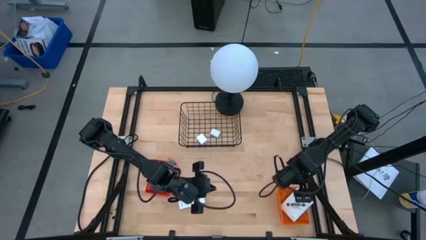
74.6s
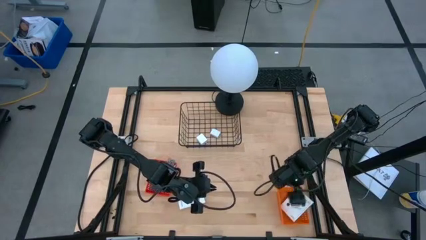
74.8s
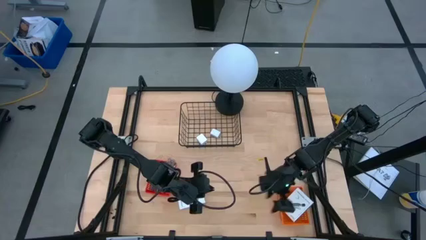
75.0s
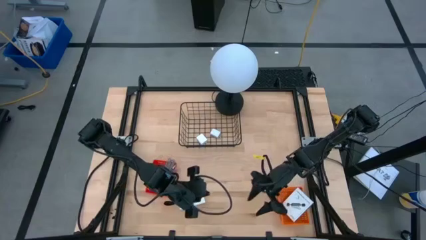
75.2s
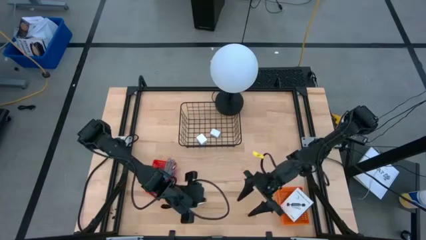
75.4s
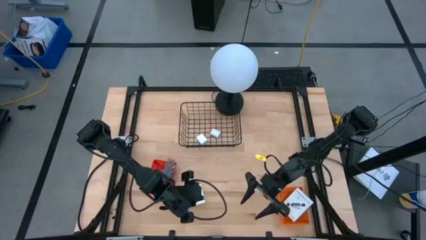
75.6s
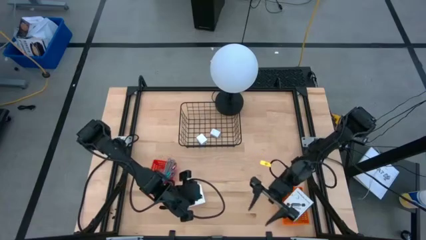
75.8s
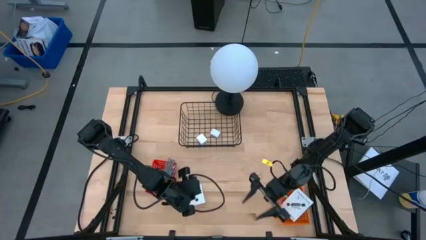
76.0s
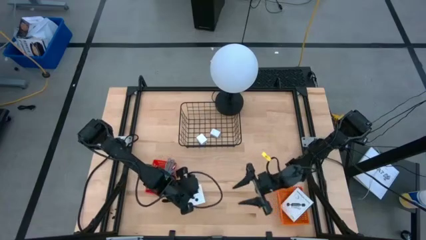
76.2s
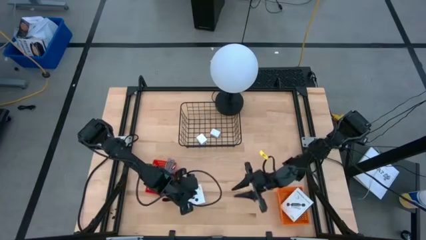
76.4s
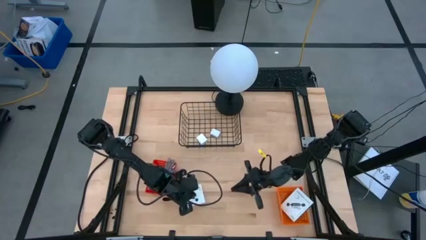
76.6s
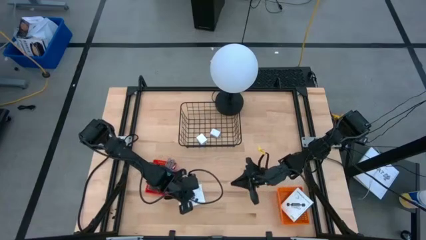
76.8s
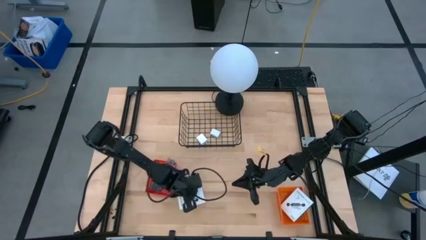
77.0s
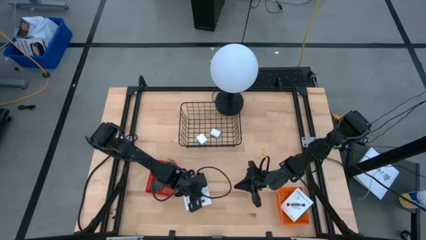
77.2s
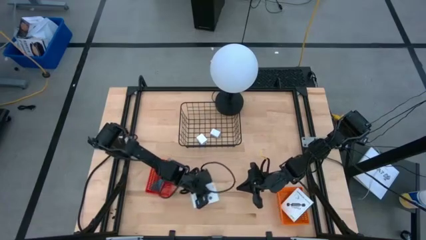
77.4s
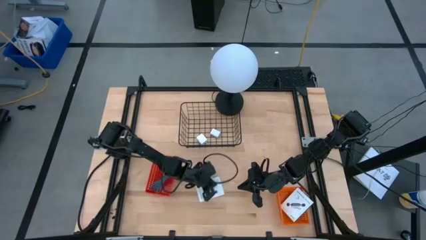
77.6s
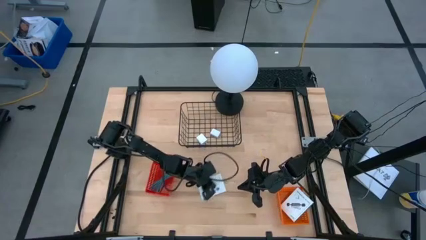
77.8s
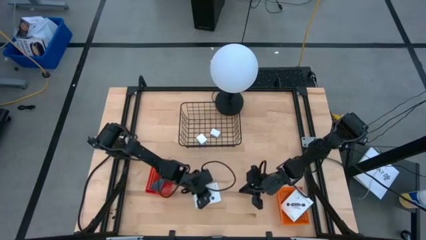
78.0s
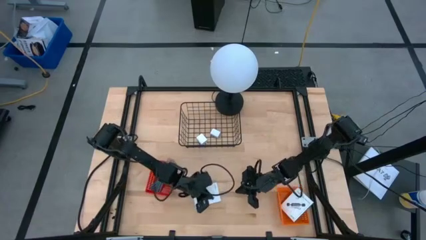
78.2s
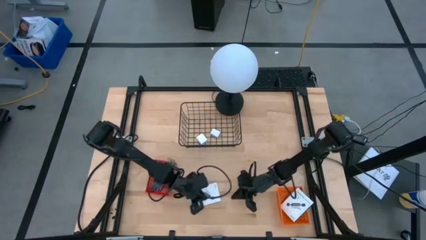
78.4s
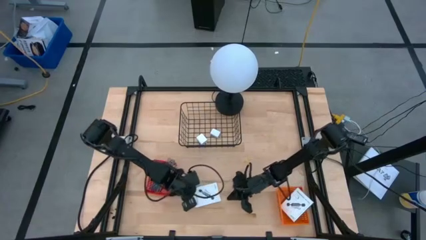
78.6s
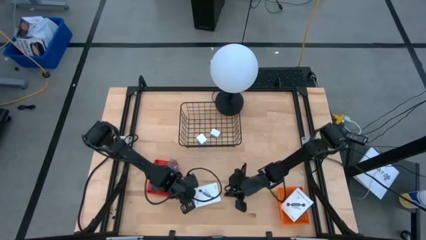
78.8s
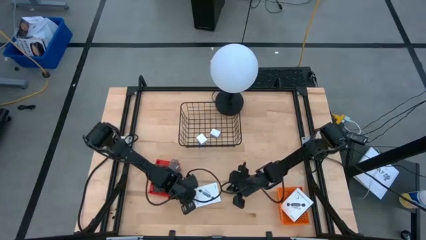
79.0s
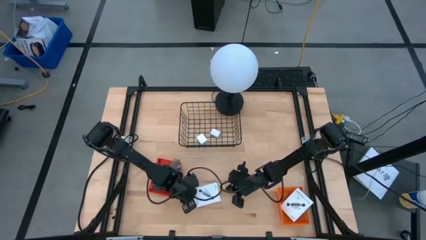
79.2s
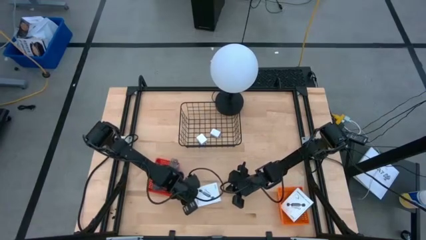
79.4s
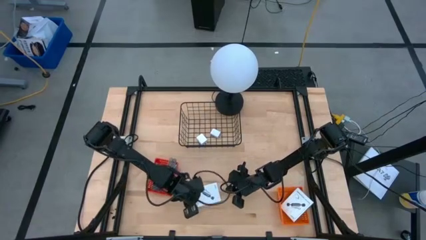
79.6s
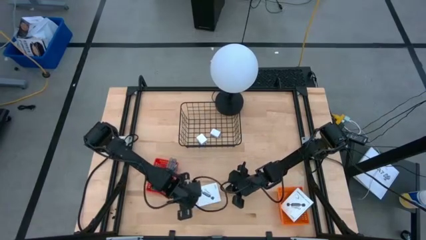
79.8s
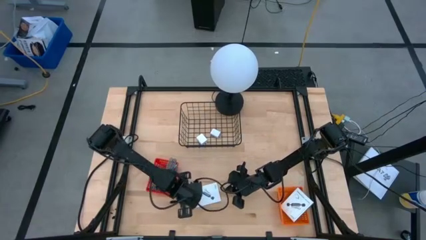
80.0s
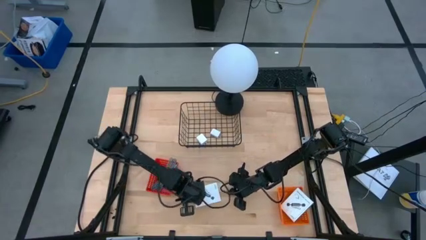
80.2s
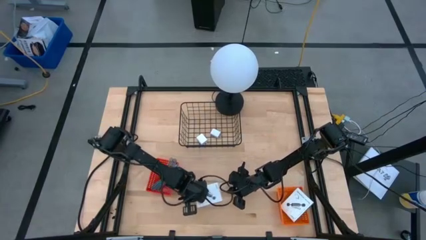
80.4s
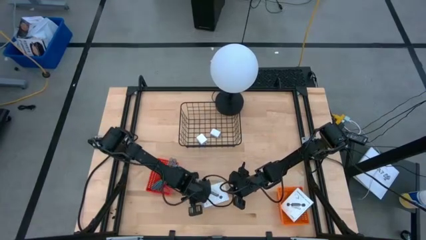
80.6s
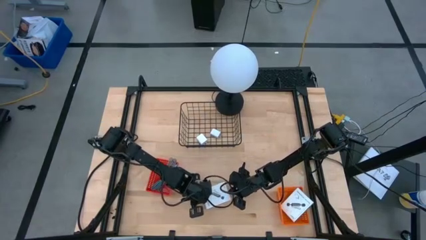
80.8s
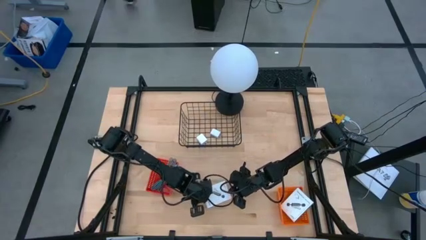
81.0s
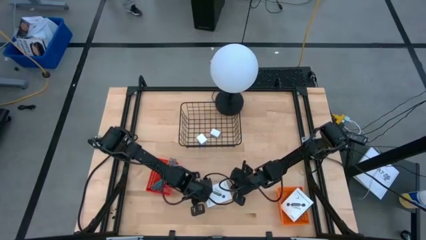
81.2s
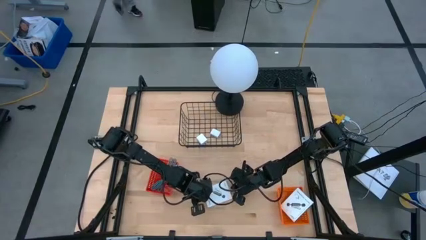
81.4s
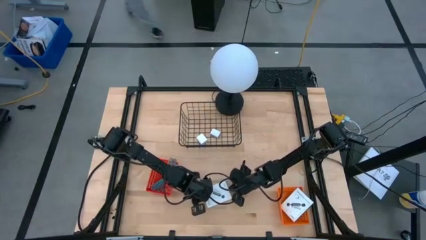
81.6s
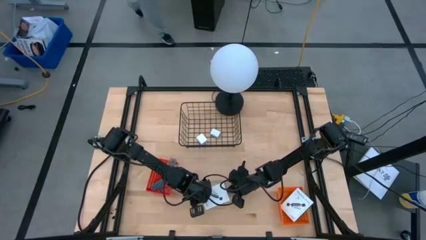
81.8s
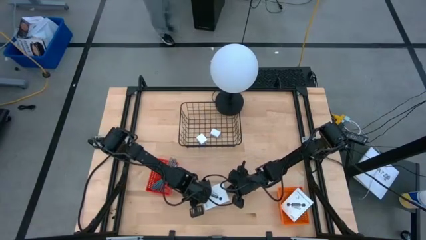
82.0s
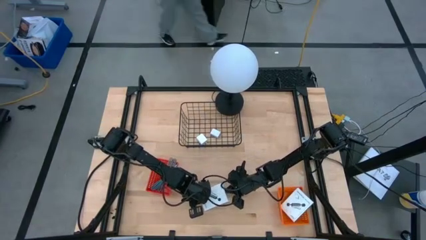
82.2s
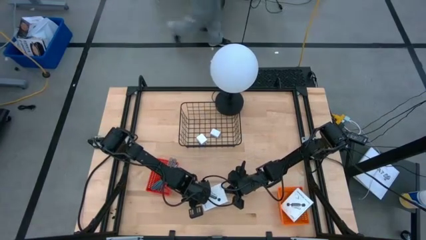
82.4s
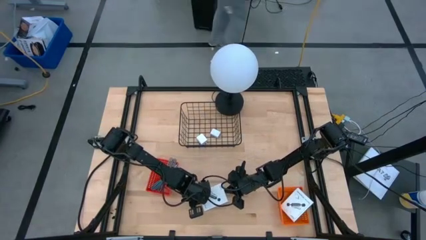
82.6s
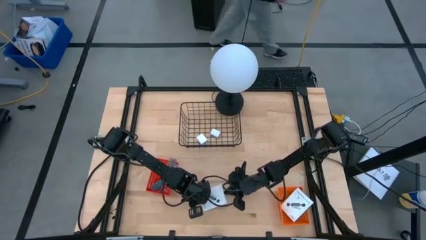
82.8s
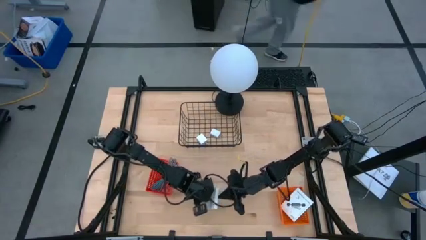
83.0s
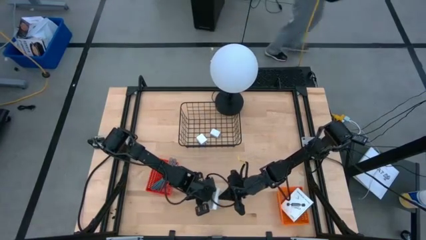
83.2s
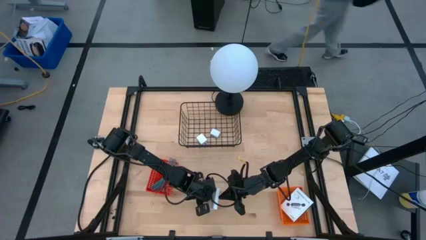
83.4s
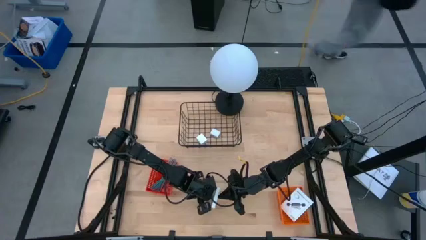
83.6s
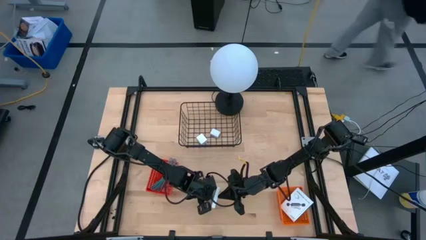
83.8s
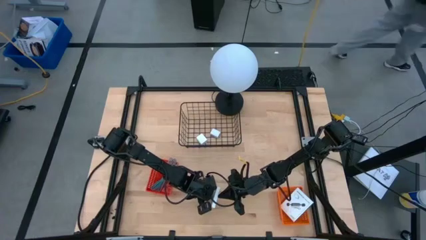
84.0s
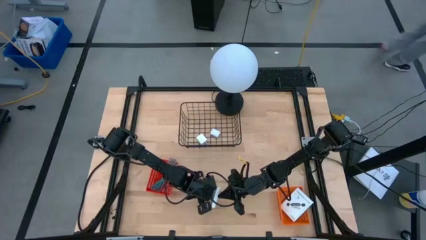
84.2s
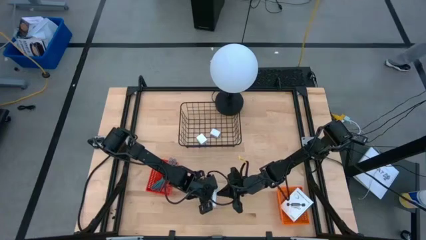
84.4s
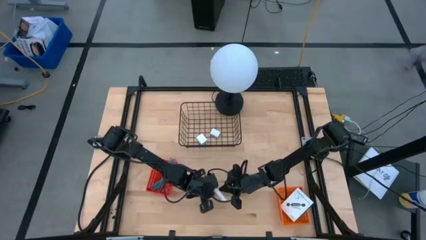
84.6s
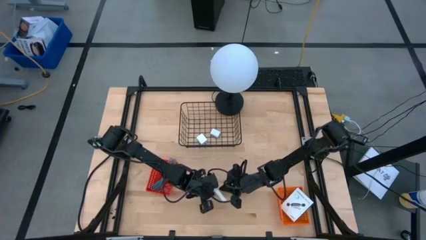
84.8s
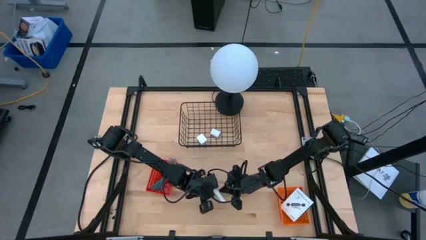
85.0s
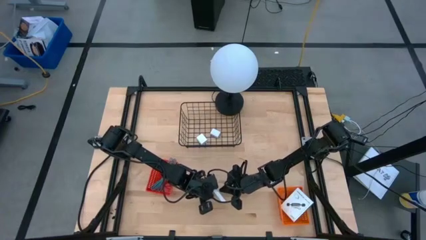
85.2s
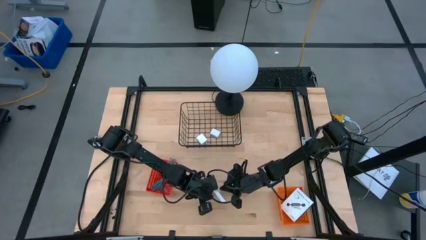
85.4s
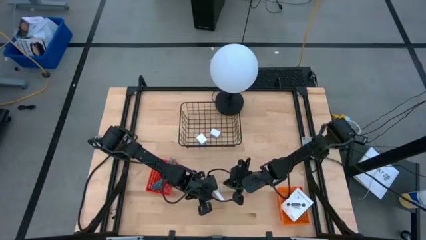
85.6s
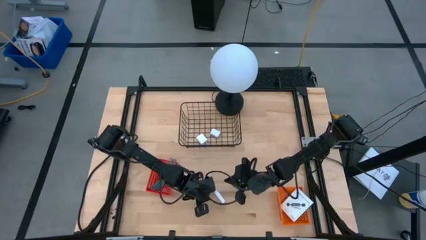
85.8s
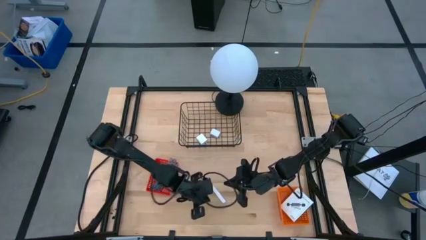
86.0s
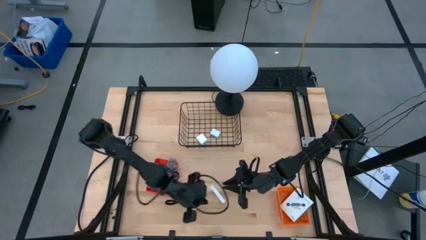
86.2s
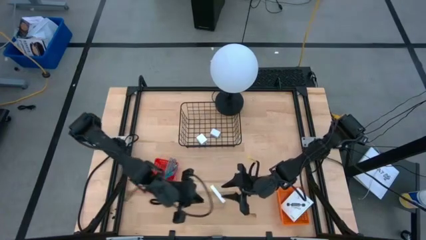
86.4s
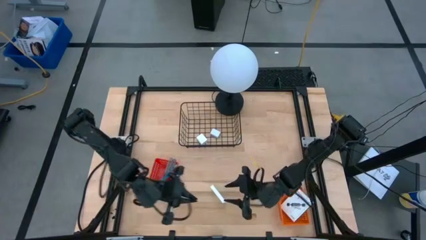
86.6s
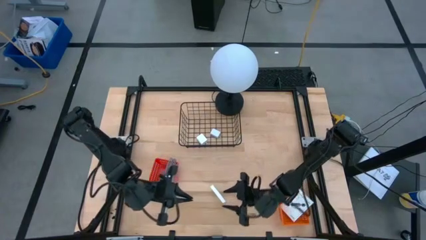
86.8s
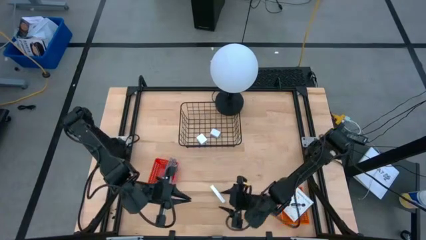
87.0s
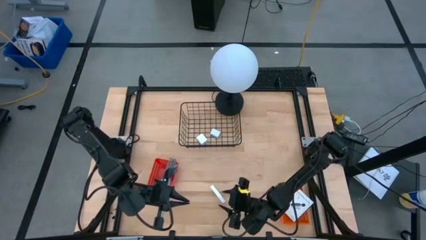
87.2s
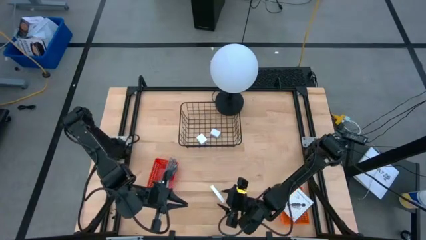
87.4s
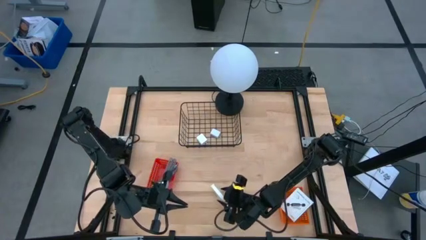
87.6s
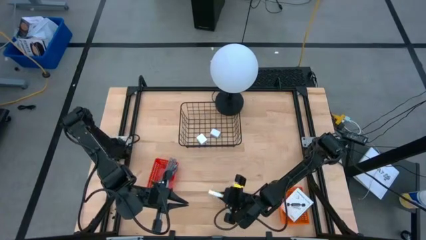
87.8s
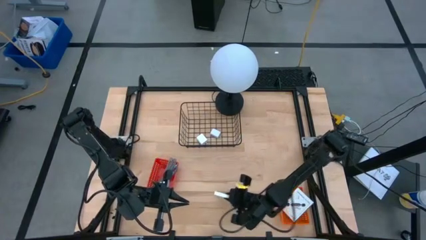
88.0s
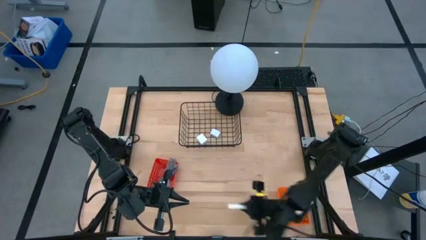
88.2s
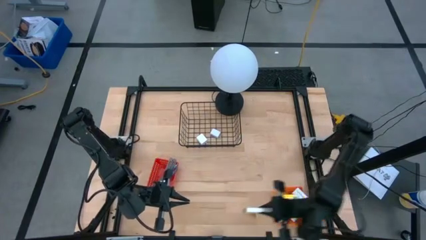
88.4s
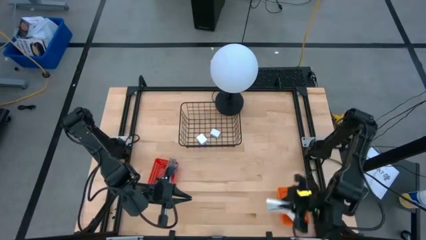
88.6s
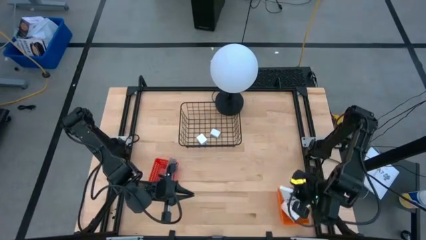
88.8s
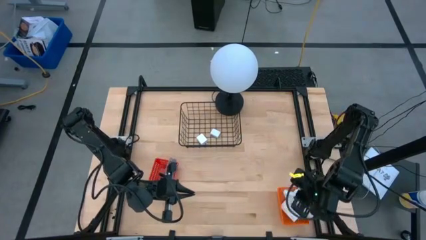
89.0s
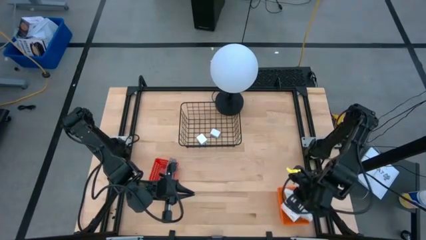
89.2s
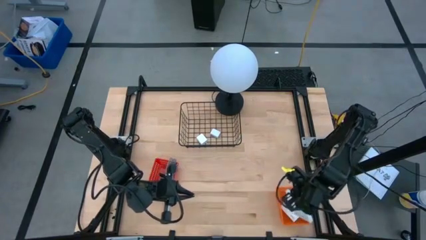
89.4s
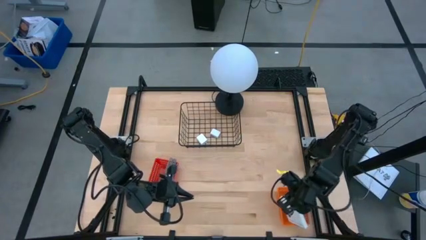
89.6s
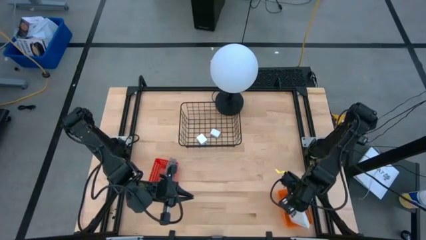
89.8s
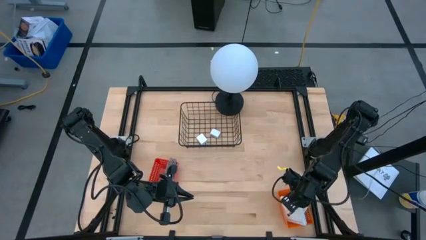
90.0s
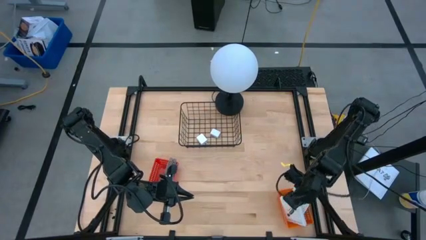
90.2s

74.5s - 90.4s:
Task: Pick and place items into bin
Put the white card reader box into the orange basket
